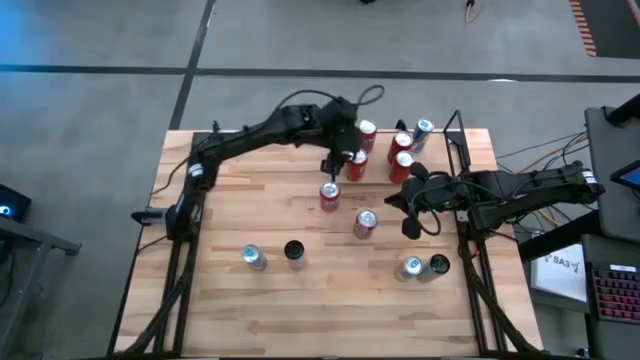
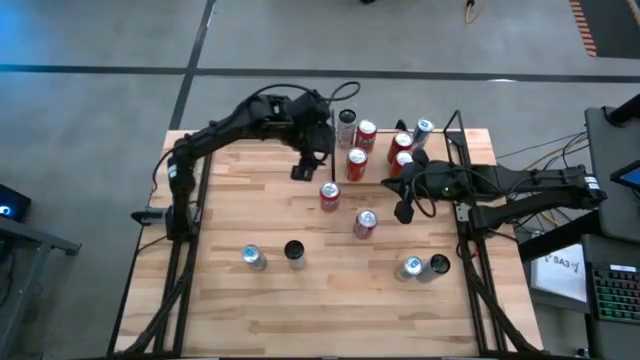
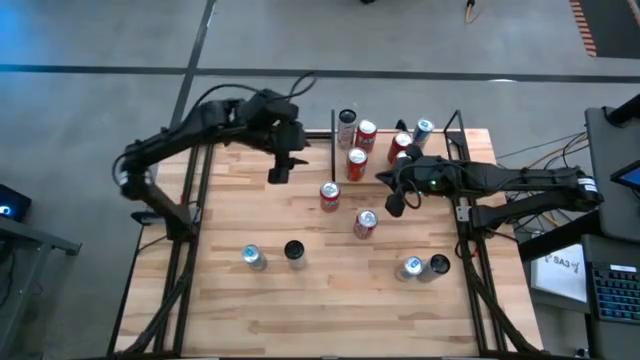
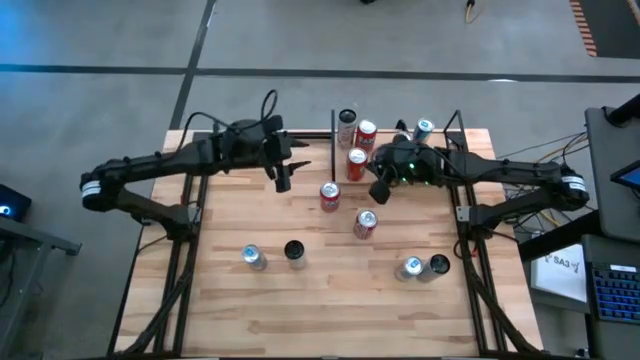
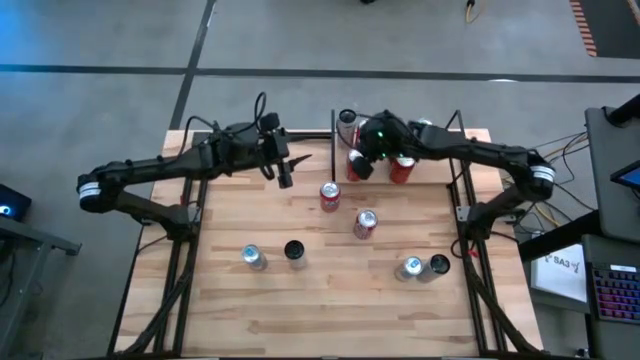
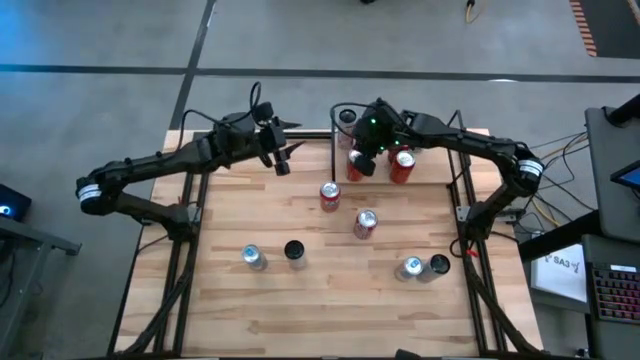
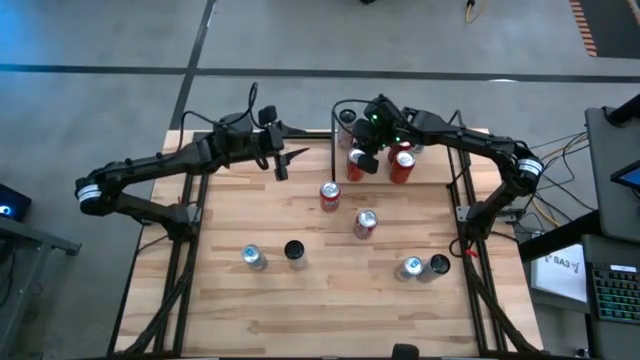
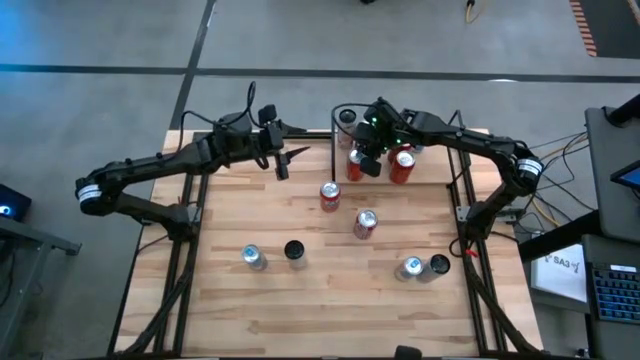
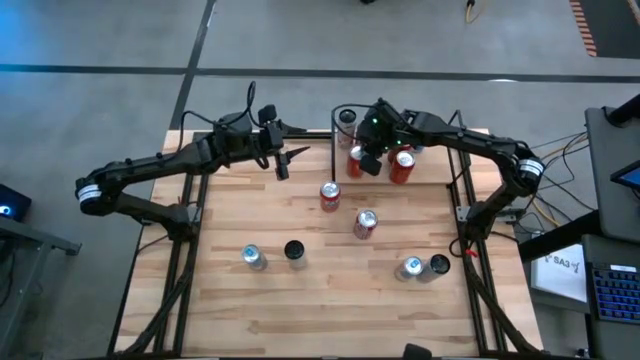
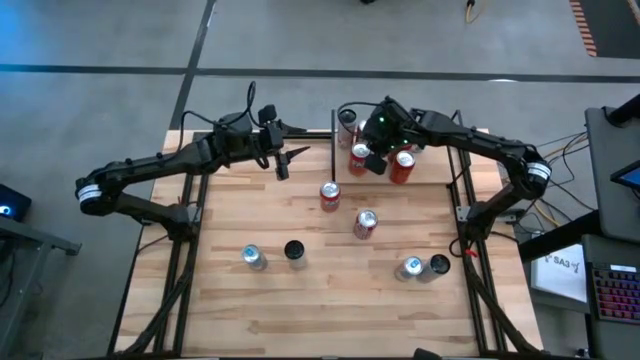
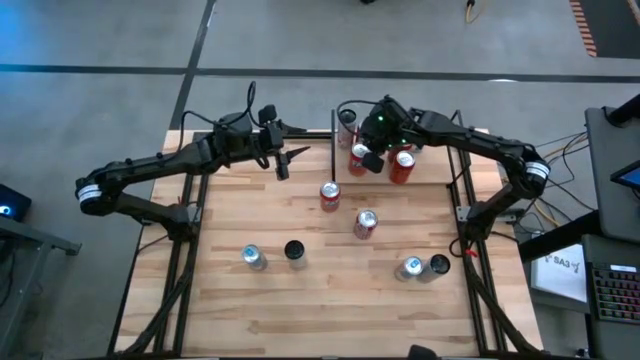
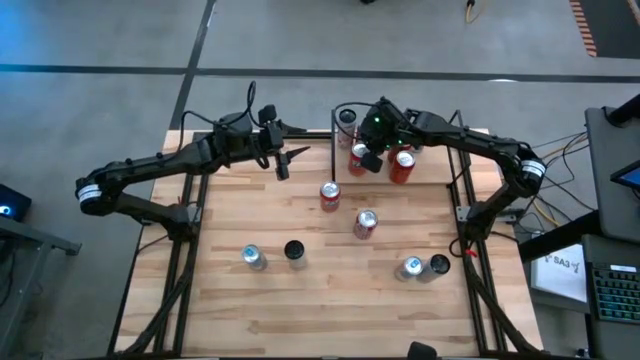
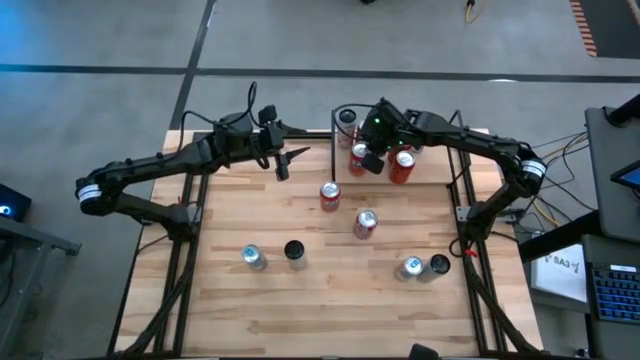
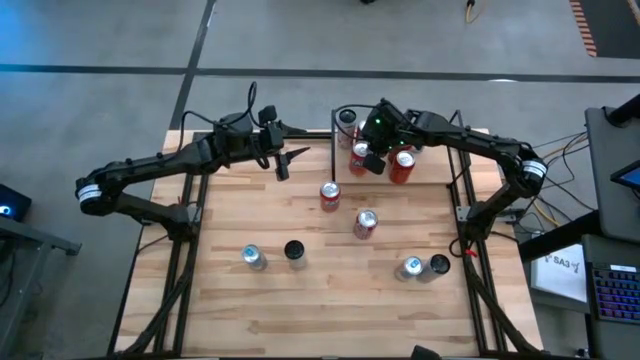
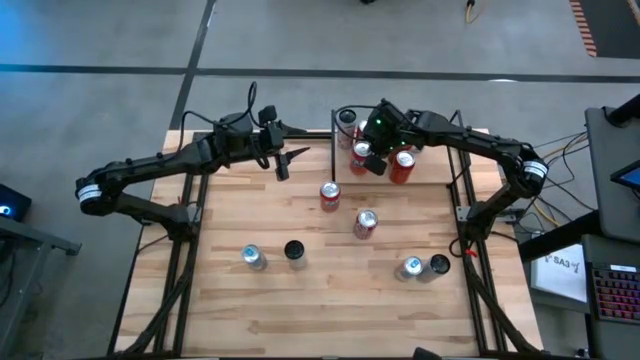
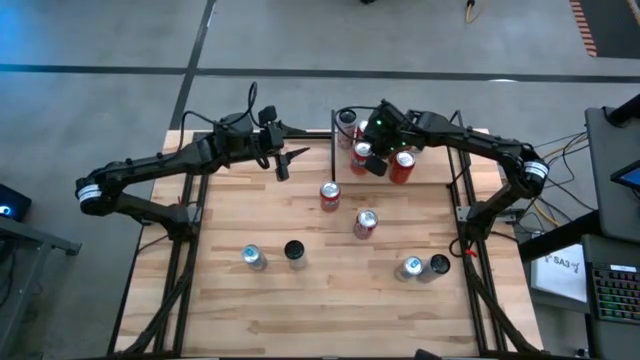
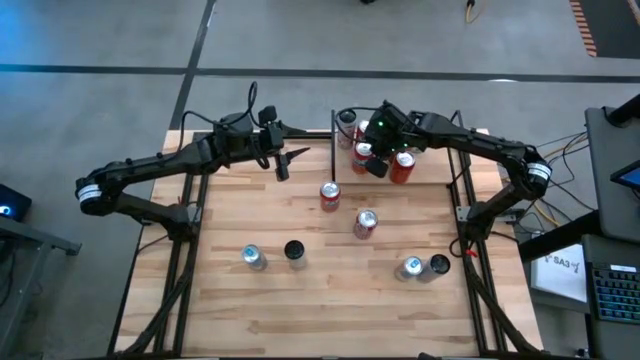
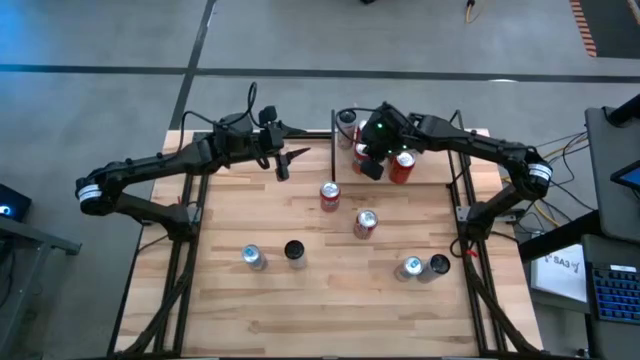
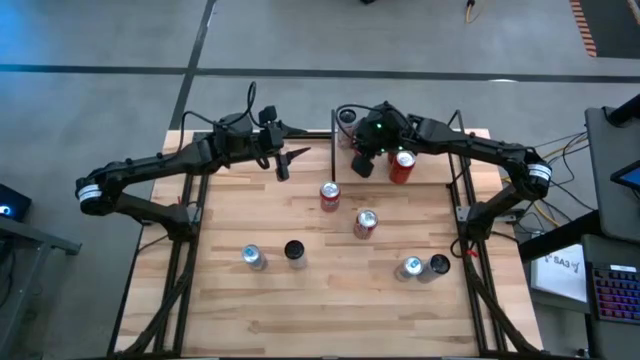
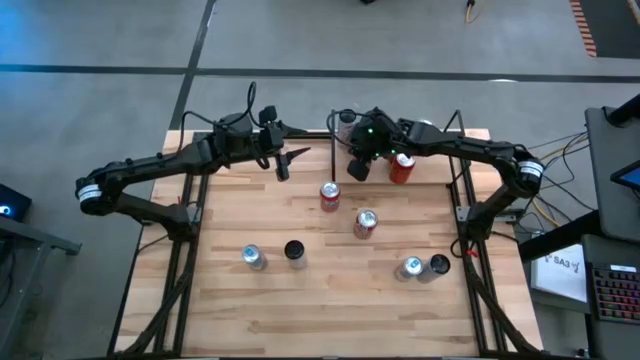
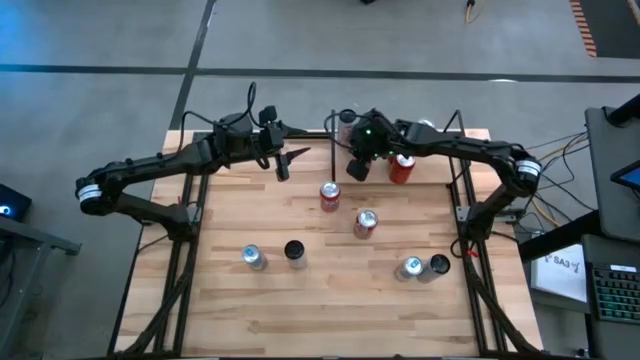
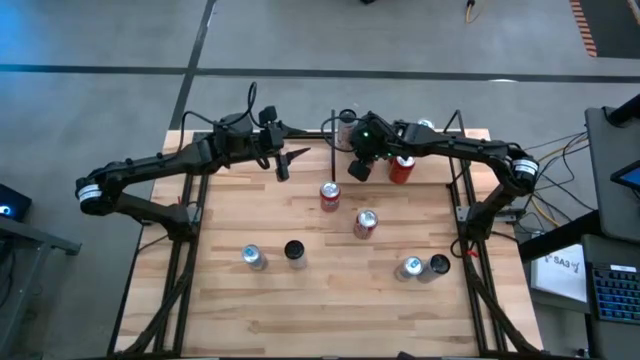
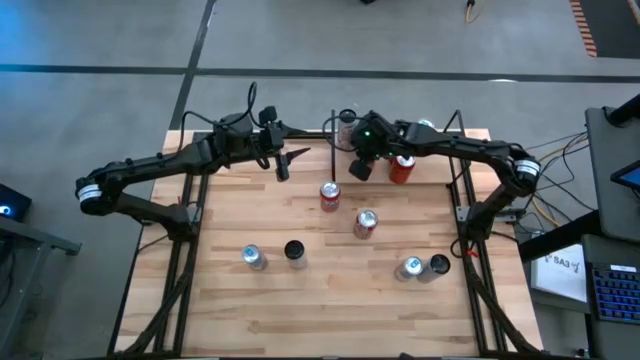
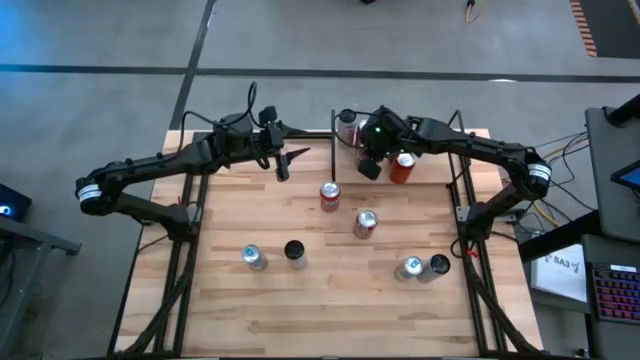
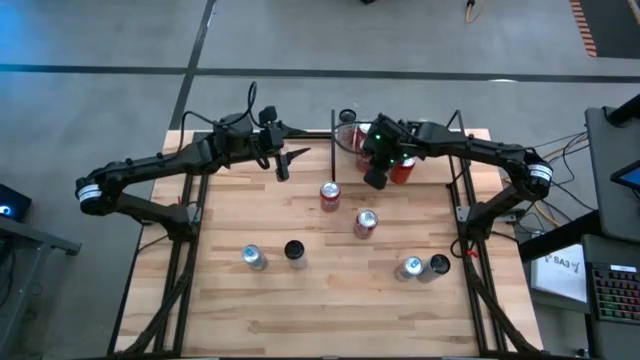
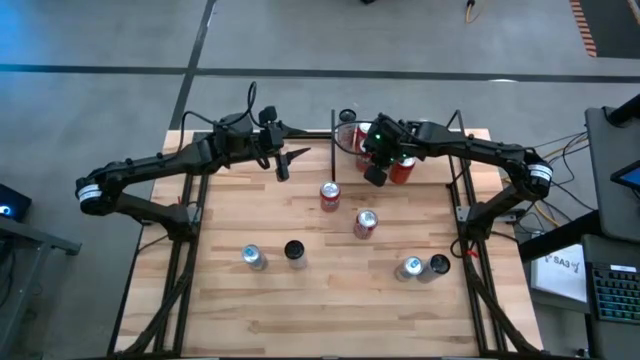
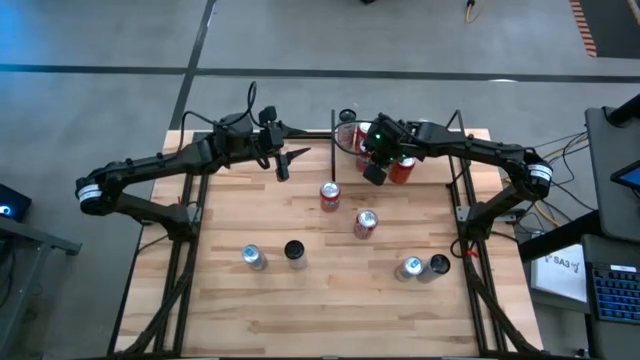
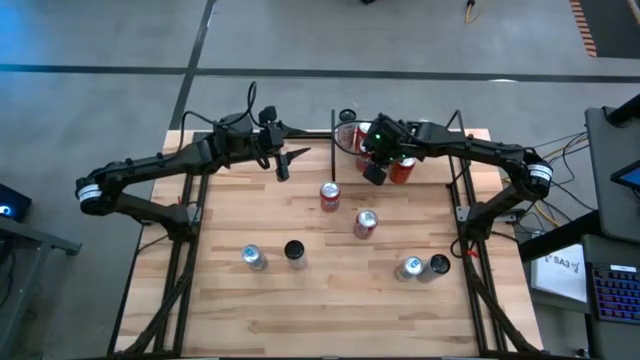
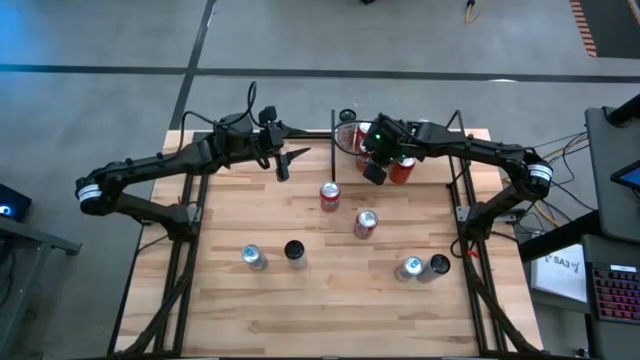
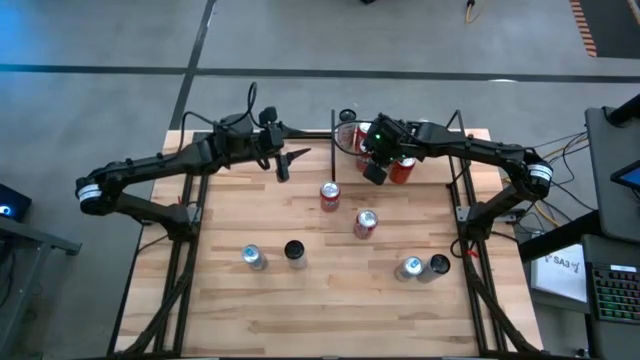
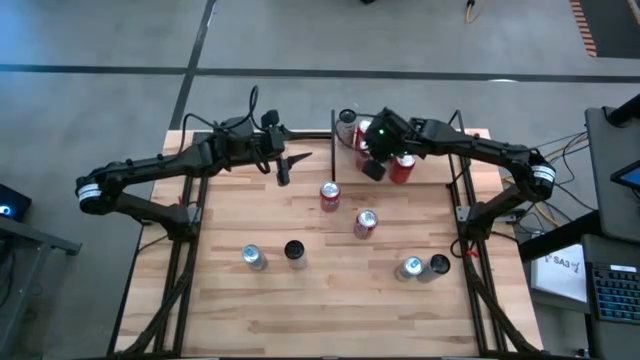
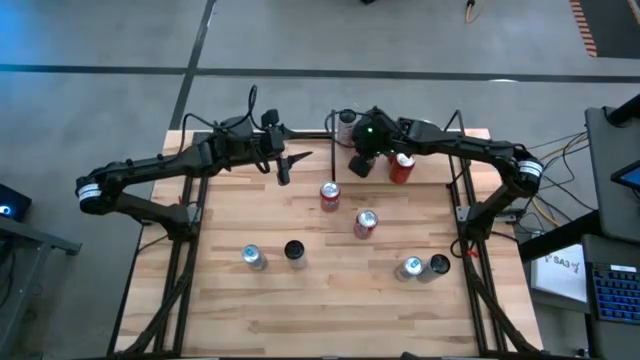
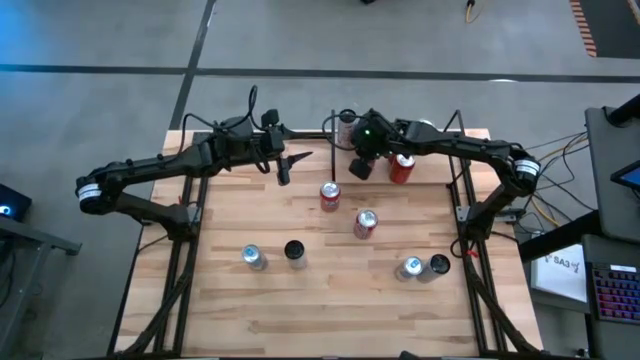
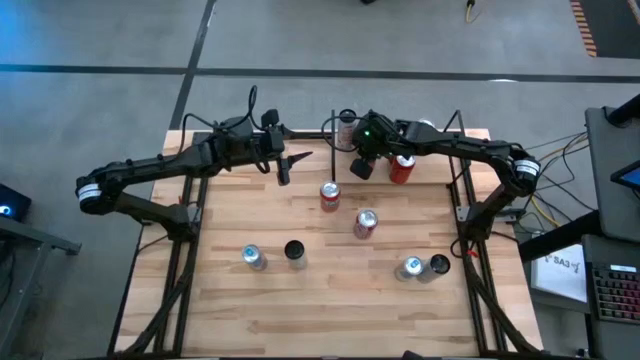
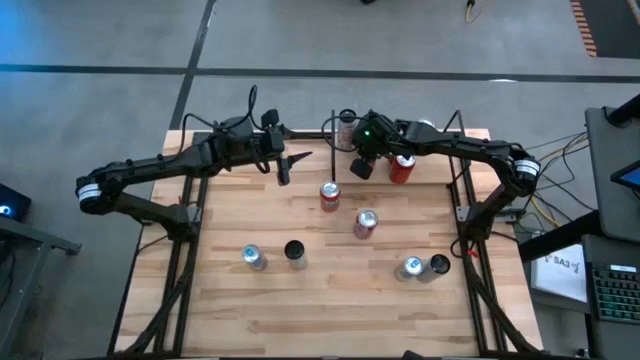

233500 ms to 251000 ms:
Task: Place canned beverage on shelf
Put the bottom orange soda can on the shelf aligned with the other orange soda can

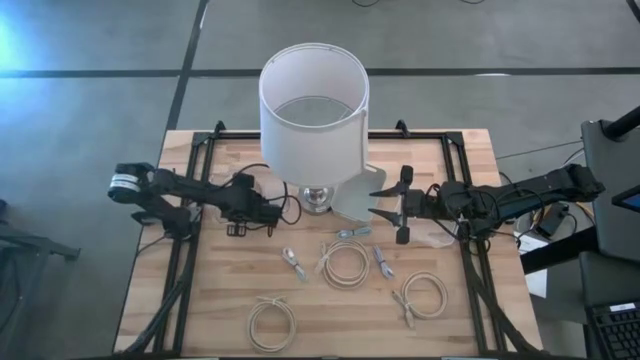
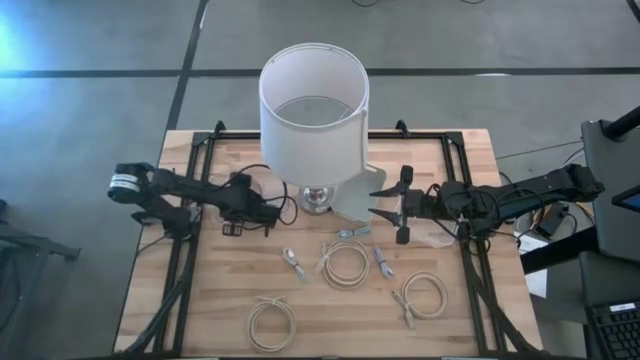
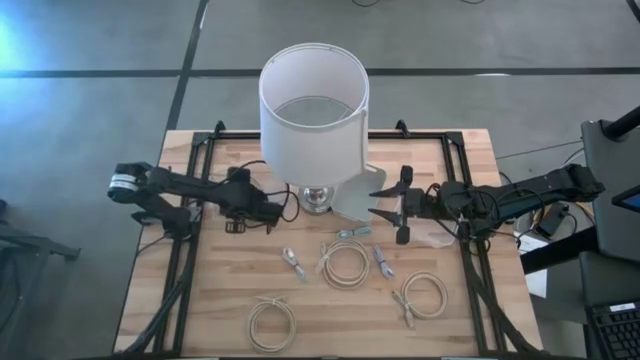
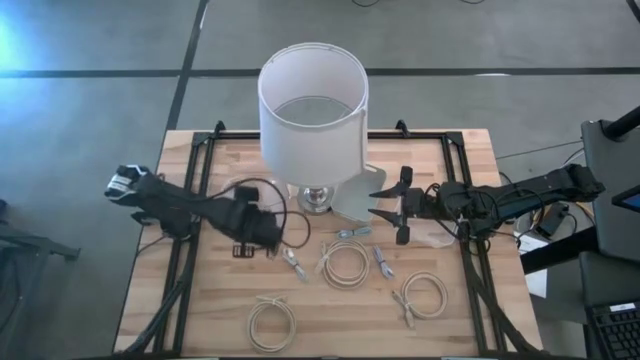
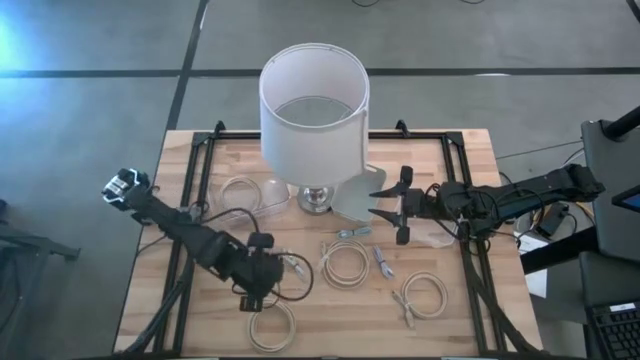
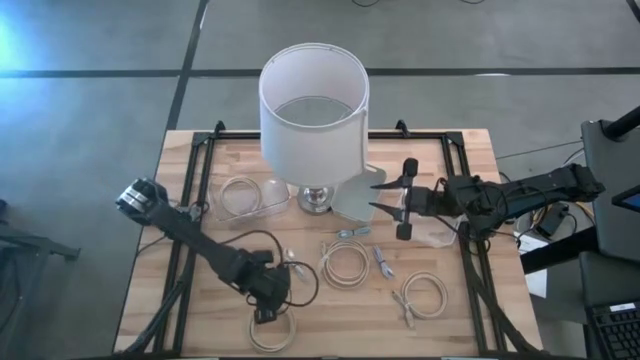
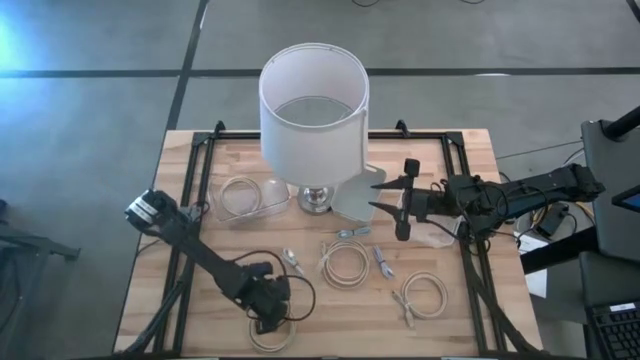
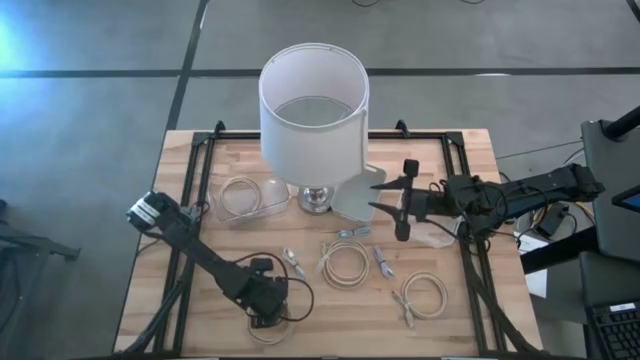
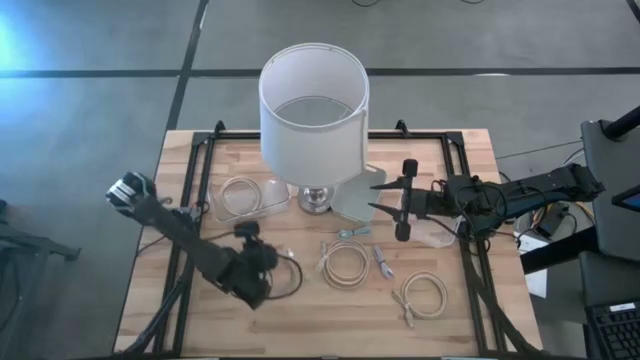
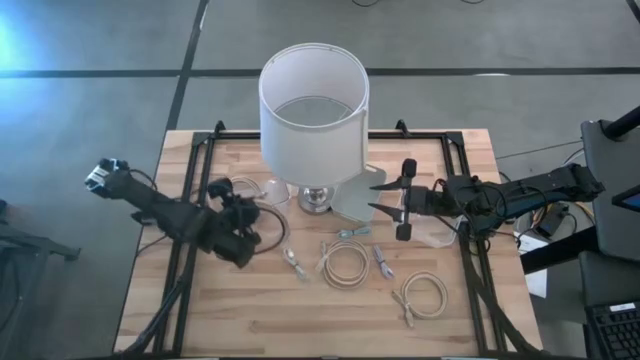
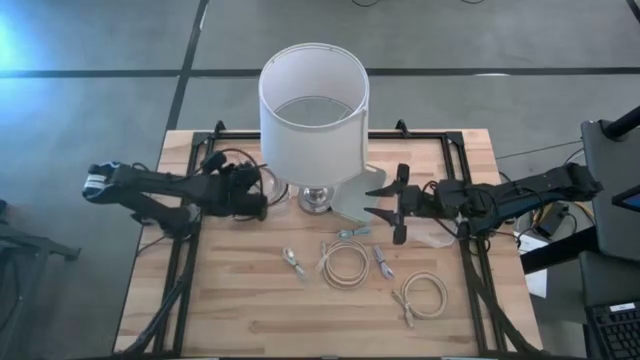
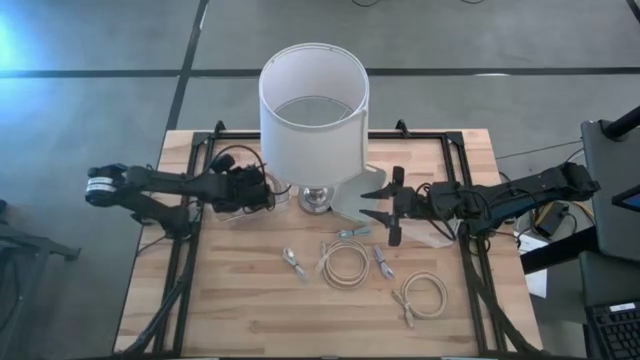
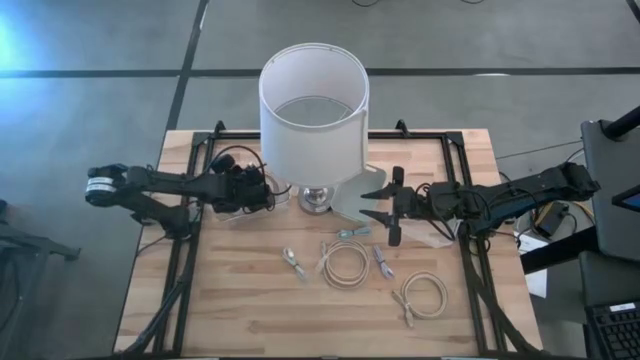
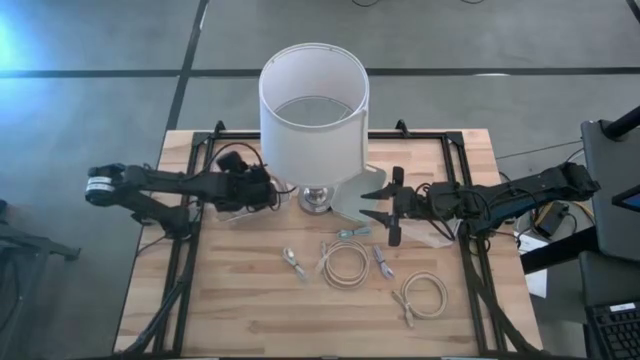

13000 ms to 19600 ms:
Task: Pick & Place USB Port
Put the light brown HDMI cable into the left transparent bin
